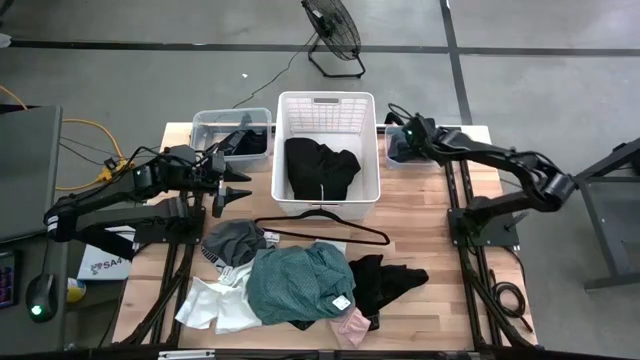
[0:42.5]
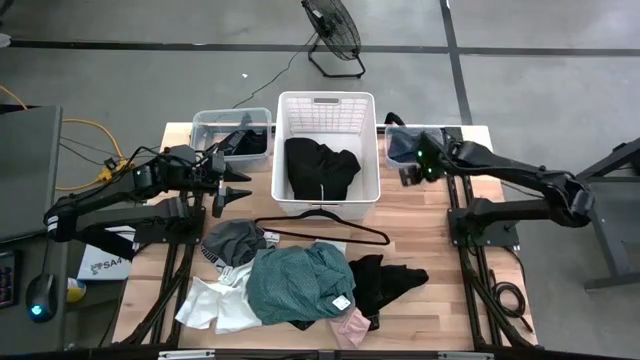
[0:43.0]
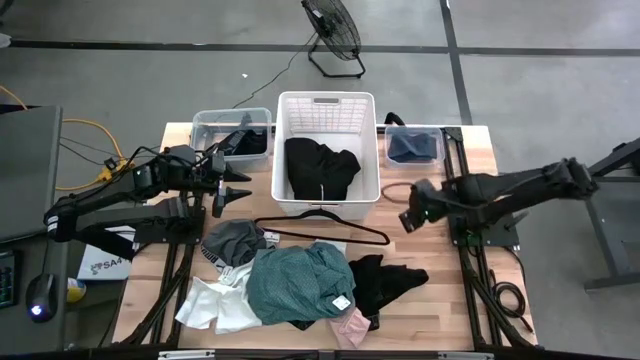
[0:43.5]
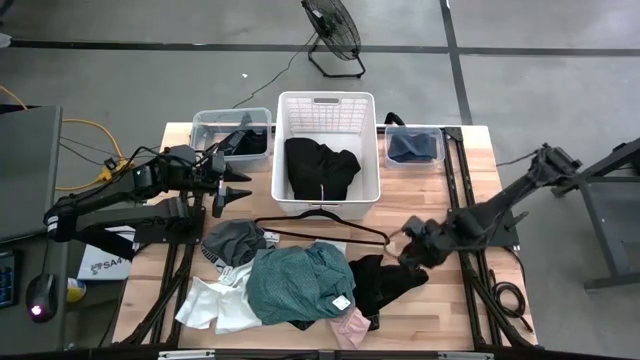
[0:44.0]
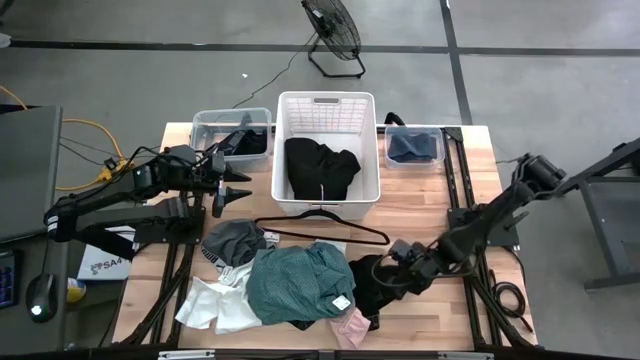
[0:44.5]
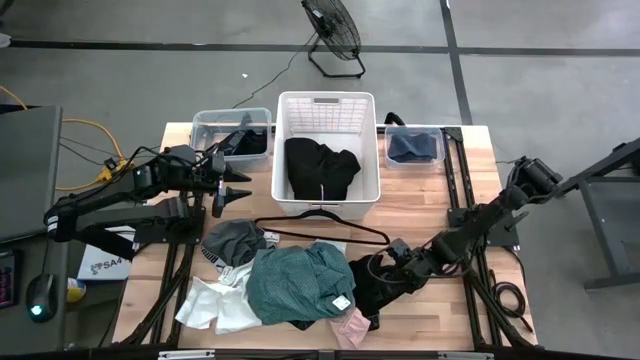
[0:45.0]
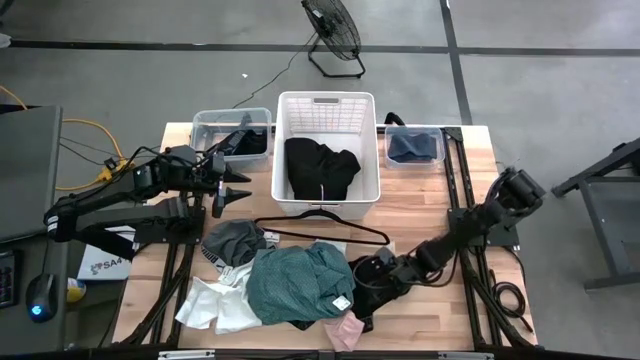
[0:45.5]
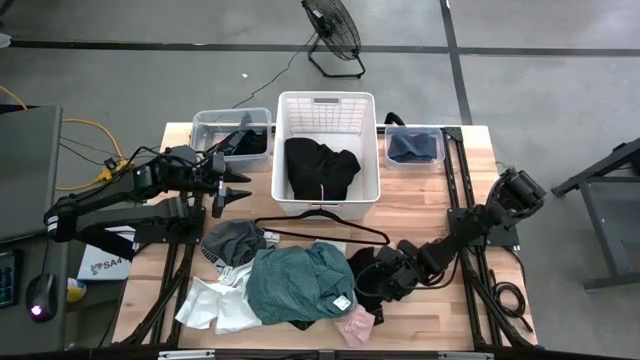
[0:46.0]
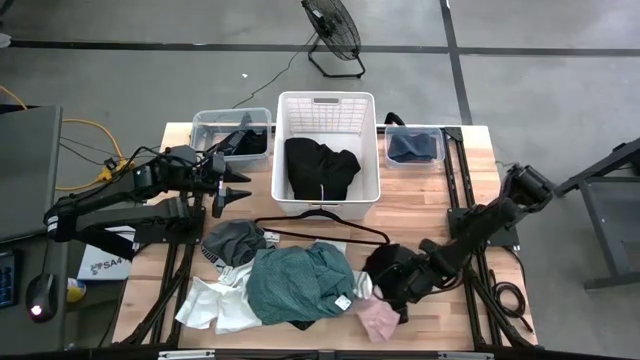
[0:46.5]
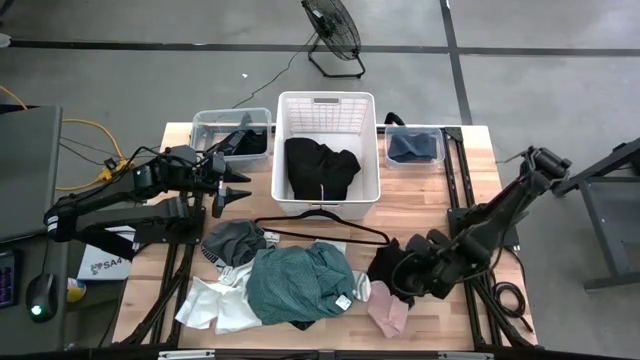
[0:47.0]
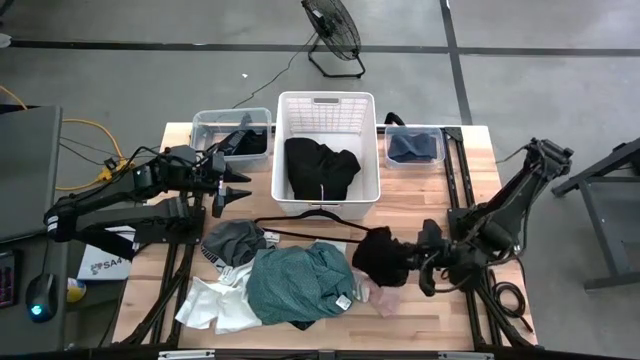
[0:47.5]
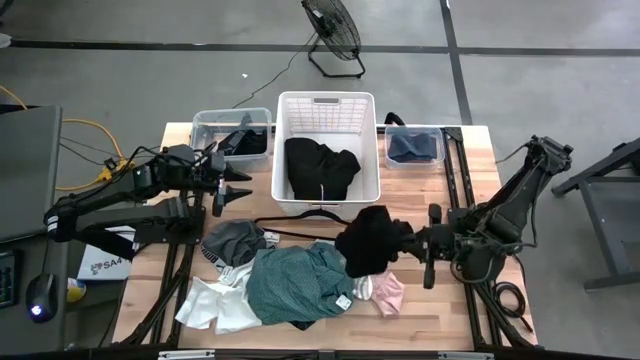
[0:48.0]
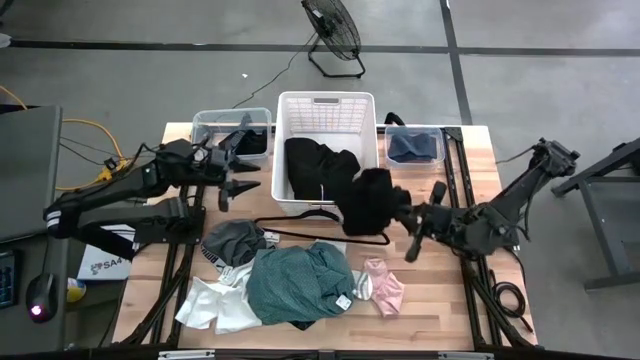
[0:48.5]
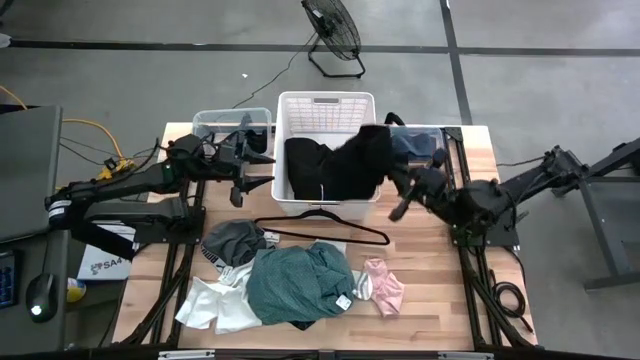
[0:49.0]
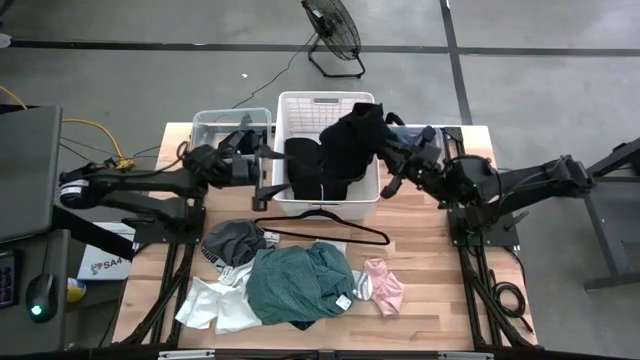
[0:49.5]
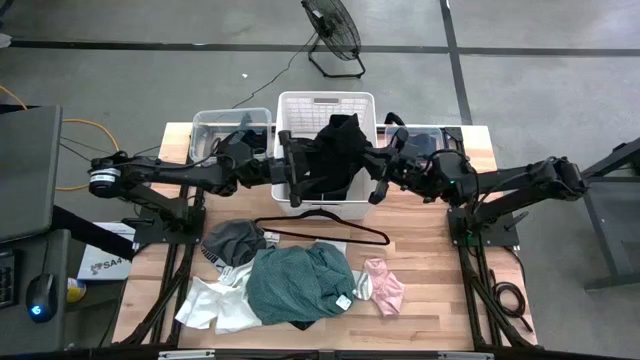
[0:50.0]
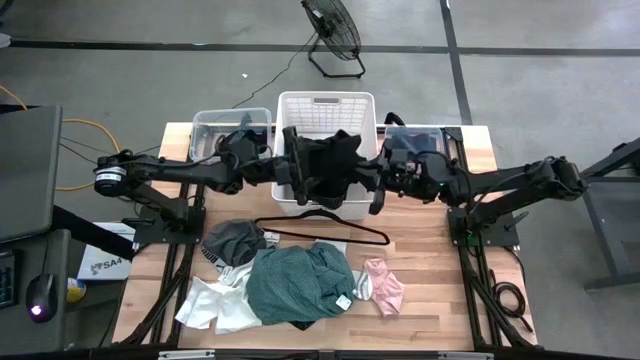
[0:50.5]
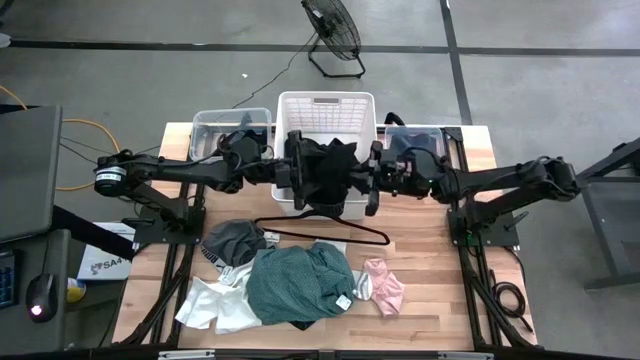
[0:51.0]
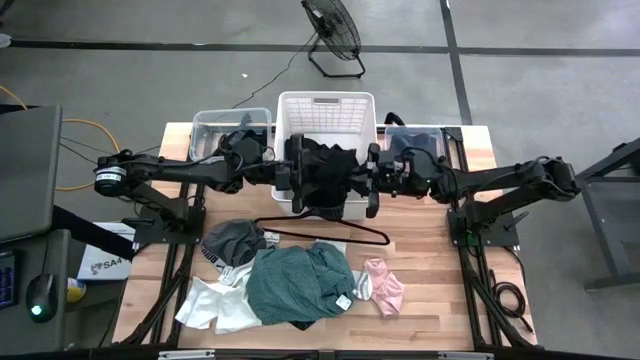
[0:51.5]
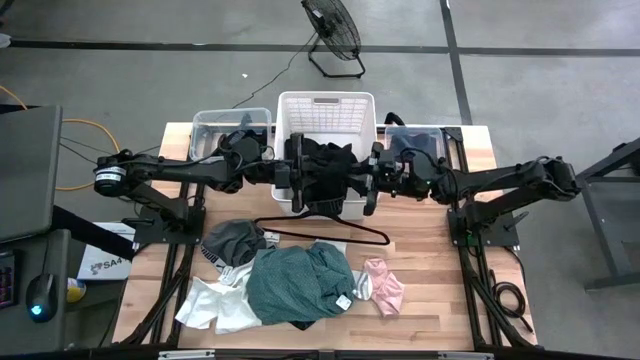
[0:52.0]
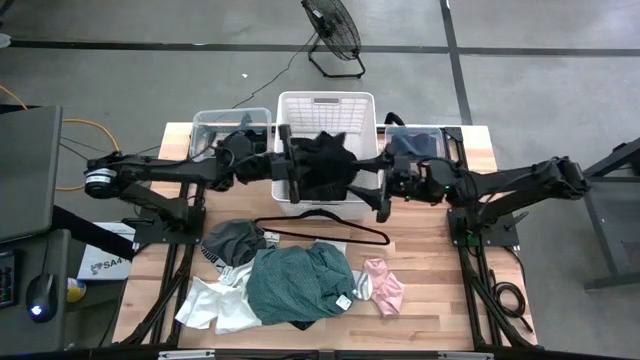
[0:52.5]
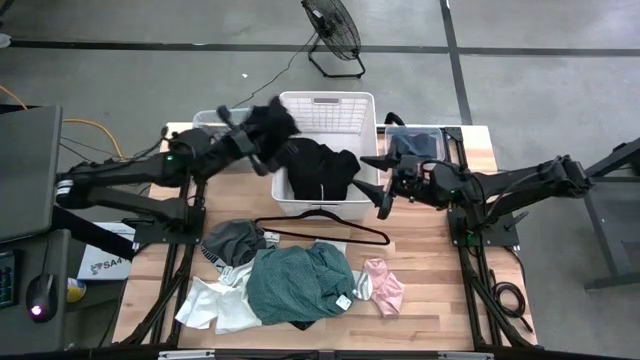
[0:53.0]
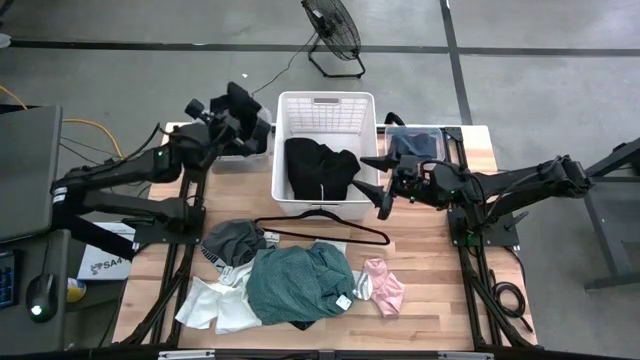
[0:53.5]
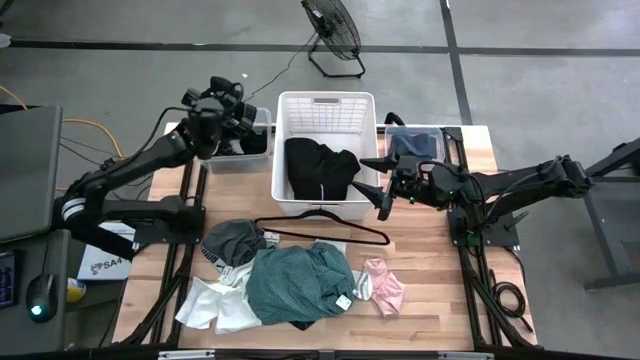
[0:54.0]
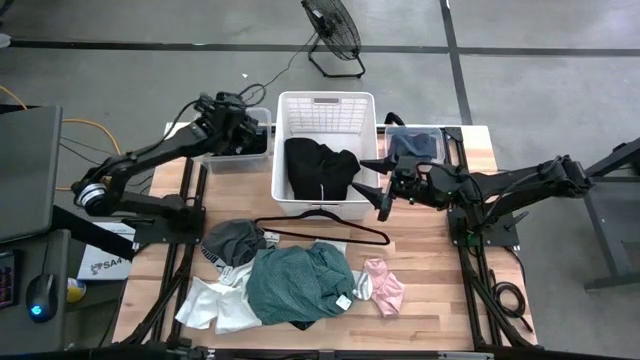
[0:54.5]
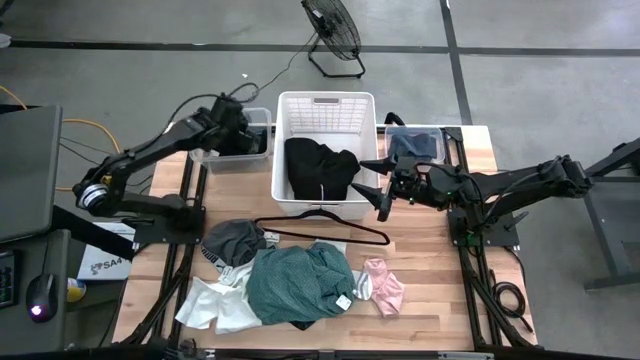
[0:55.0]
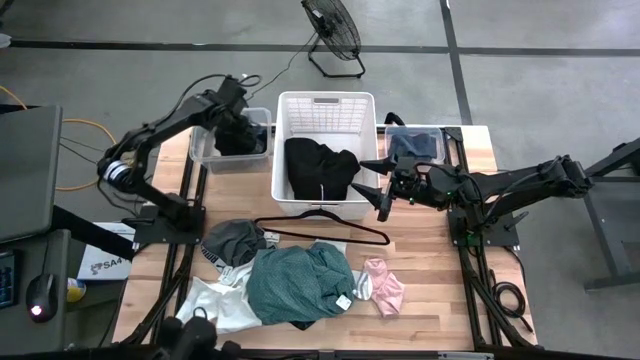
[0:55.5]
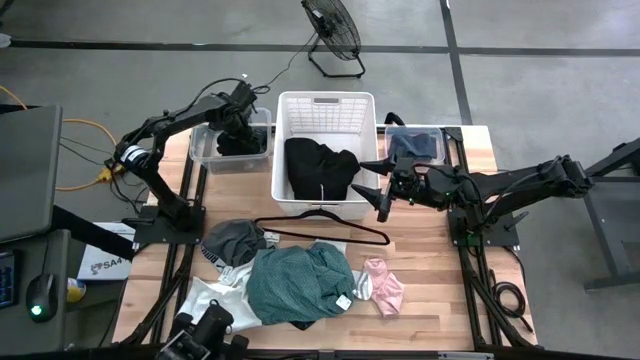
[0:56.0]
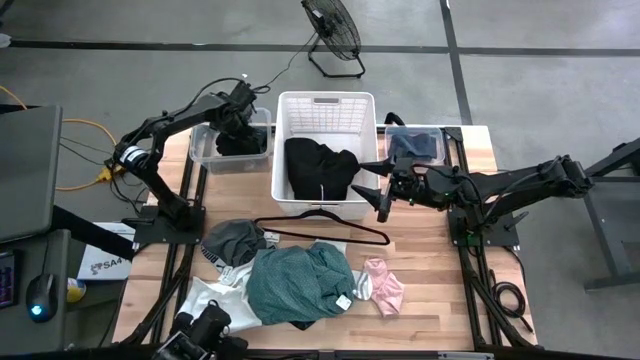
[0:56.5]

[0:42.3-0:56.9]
Task: Pick & Place Cloths
Put the black boxer shorts into the left transparent bin

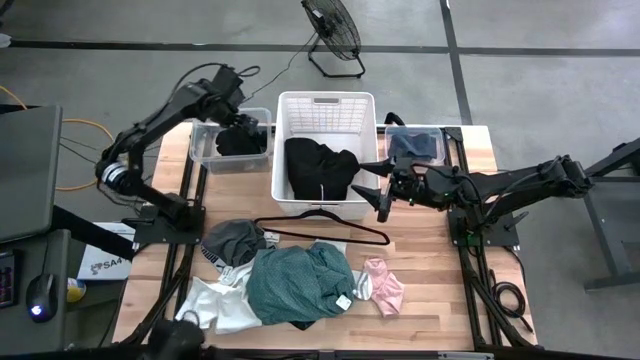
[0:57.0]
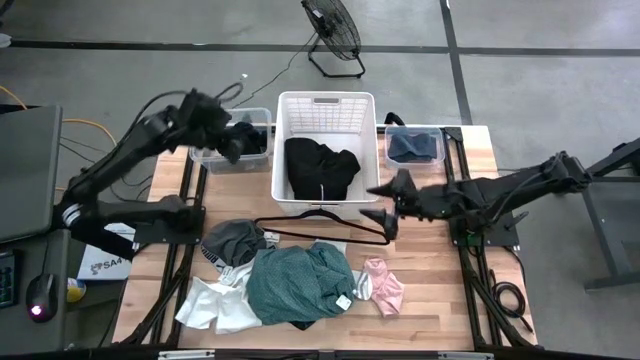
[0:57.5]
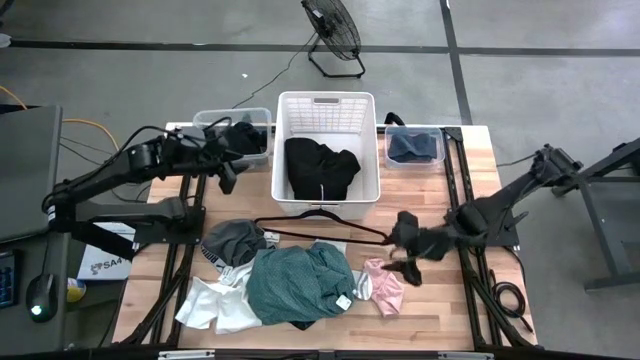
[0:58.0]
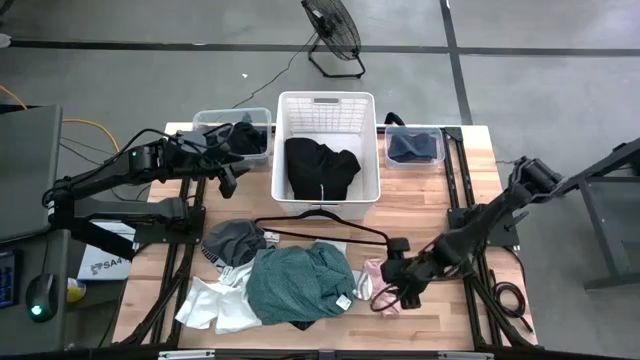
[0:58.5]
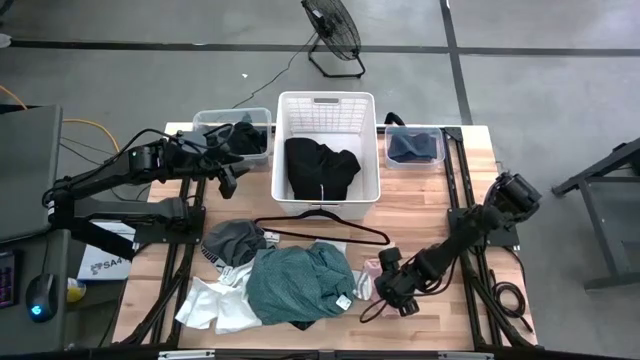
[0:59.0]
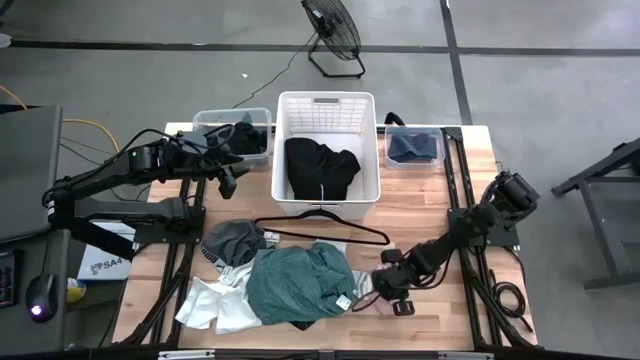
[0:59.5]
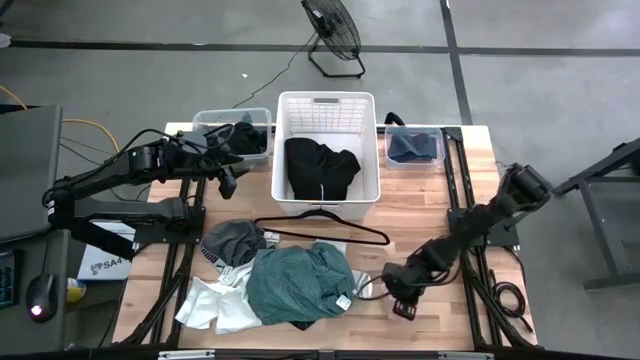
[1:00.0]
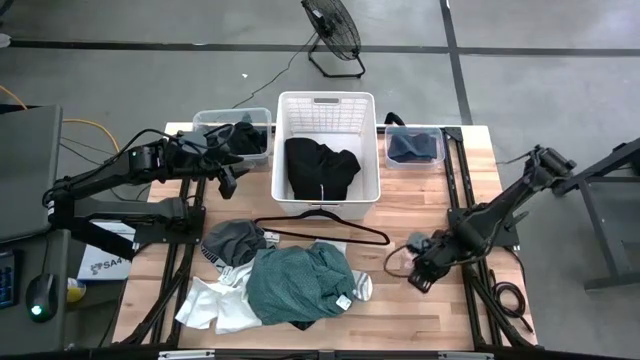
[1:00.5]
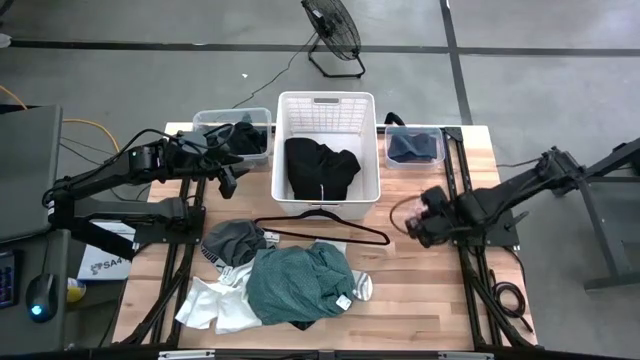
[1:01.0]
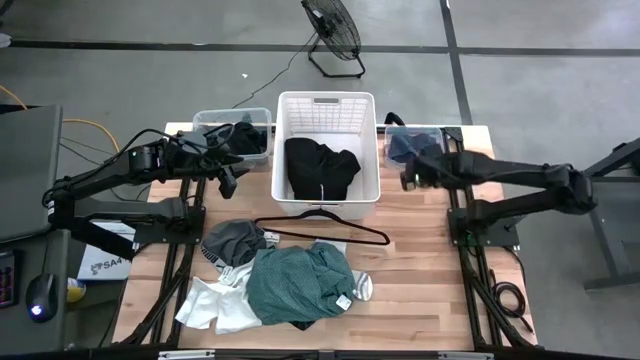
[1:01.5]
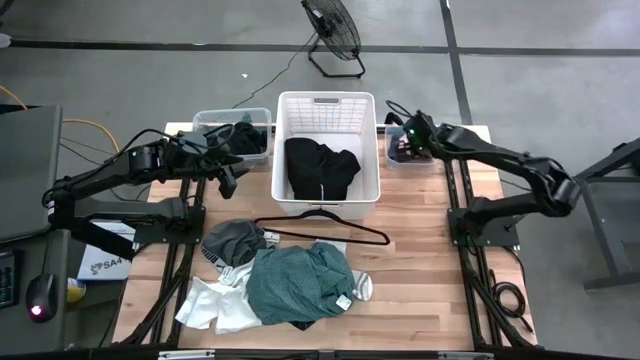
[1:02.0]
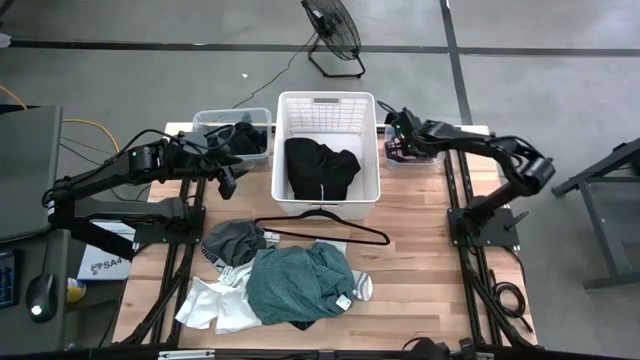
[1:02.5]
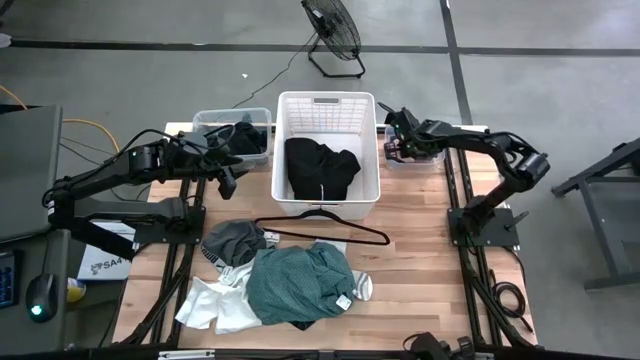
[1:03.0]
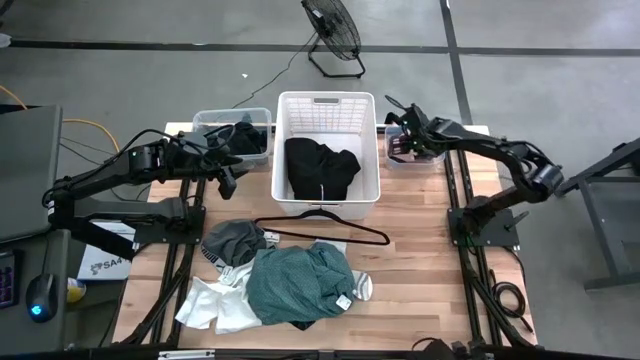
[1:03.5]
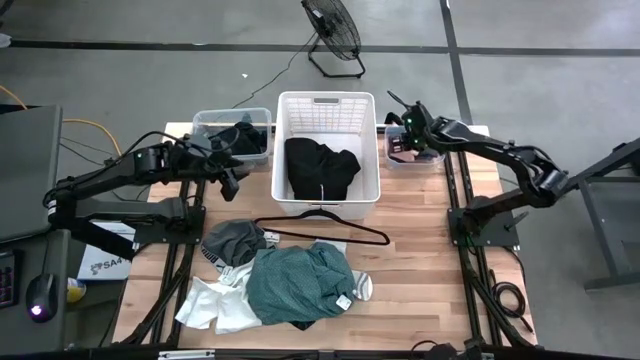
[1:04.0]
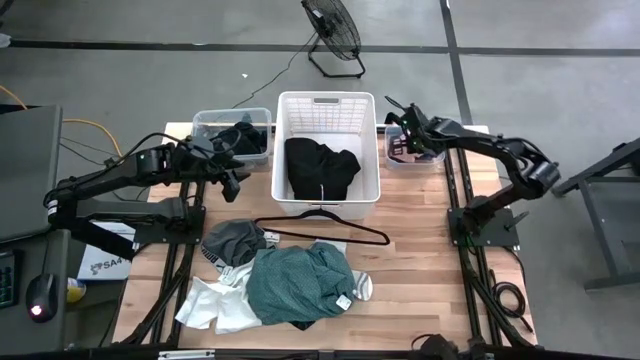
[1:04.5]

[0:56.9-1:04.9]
Put the light orange sock into the right transparent bin
